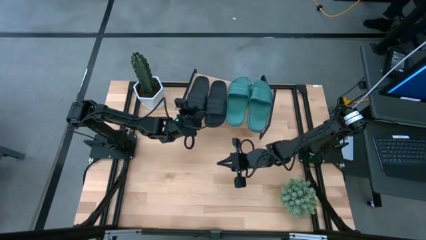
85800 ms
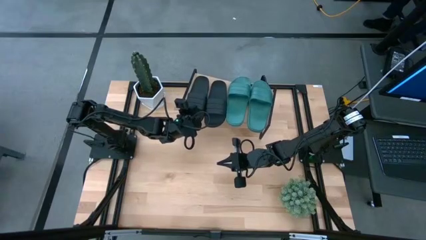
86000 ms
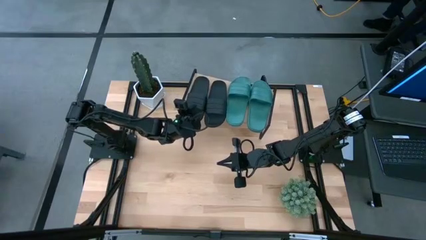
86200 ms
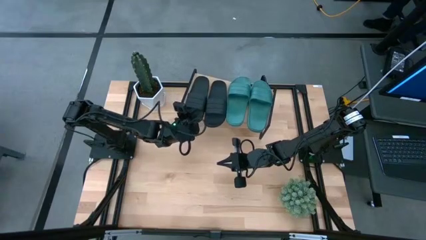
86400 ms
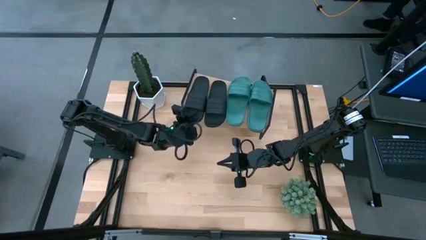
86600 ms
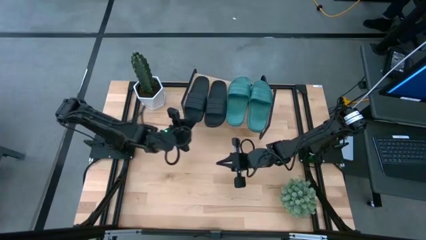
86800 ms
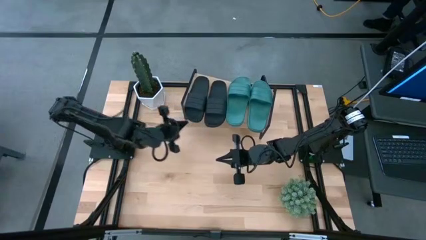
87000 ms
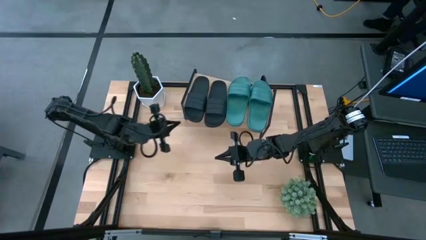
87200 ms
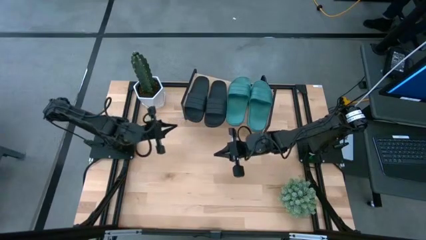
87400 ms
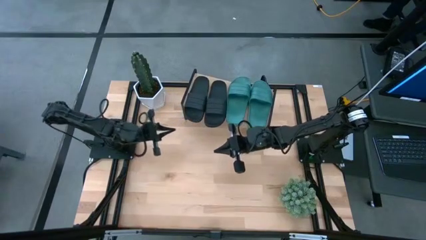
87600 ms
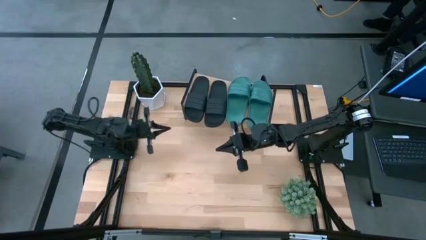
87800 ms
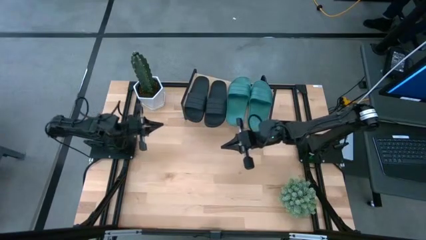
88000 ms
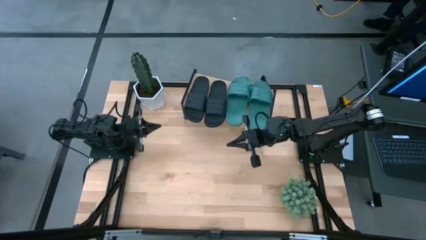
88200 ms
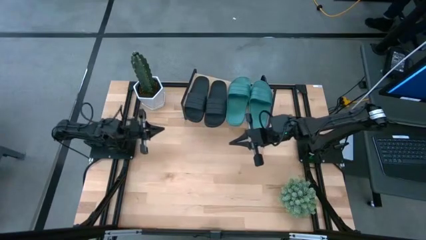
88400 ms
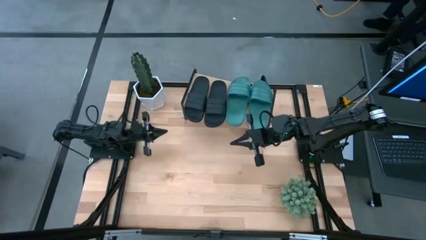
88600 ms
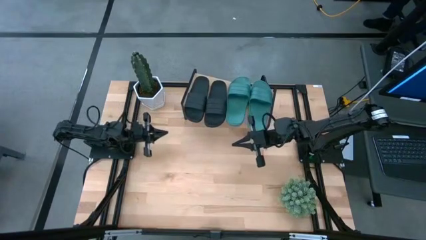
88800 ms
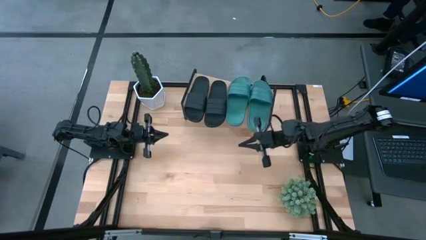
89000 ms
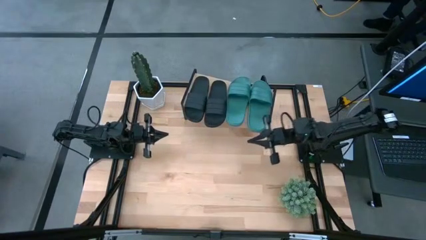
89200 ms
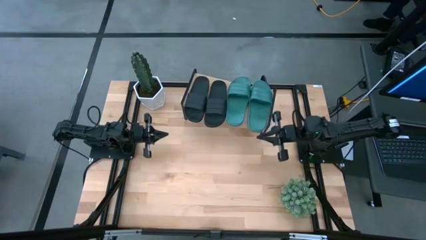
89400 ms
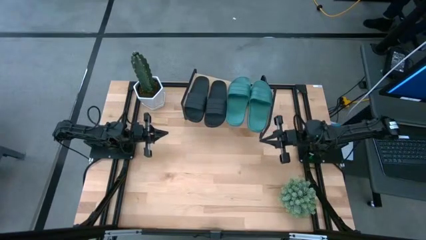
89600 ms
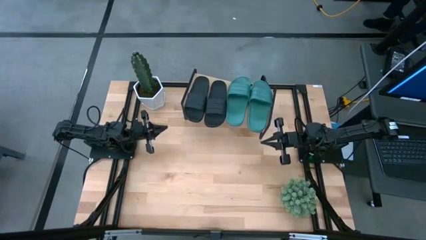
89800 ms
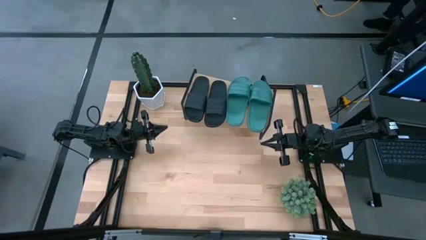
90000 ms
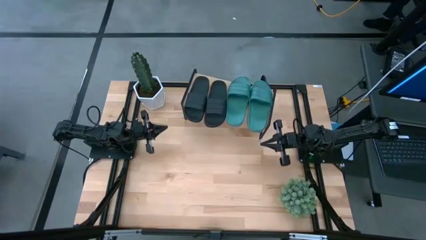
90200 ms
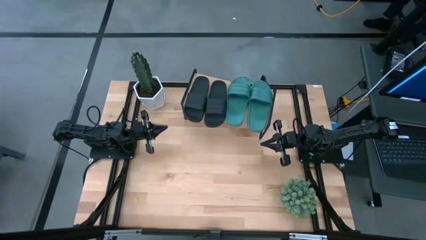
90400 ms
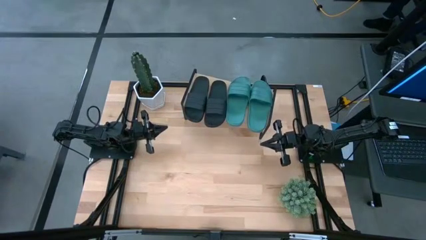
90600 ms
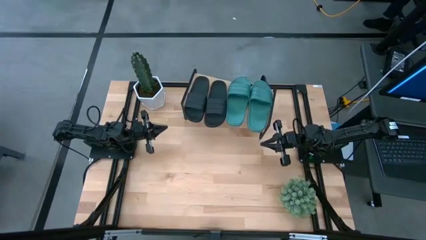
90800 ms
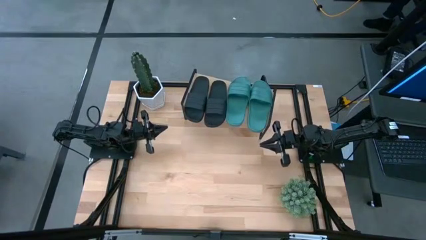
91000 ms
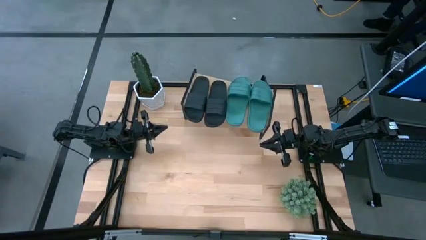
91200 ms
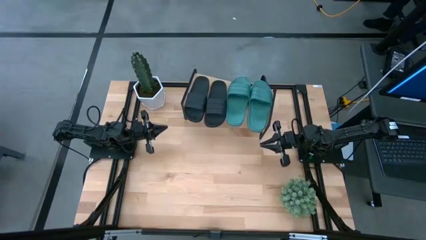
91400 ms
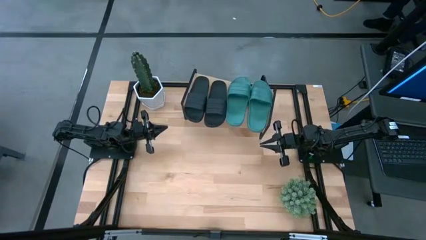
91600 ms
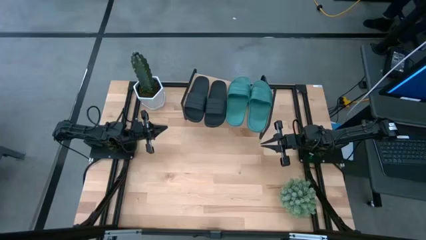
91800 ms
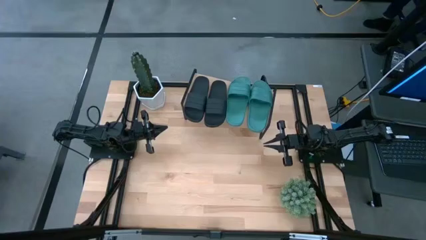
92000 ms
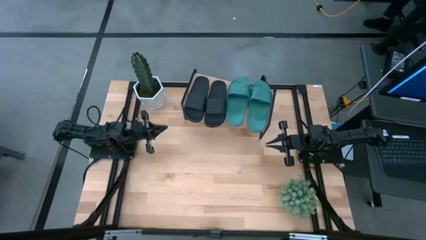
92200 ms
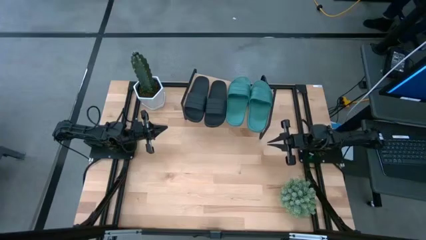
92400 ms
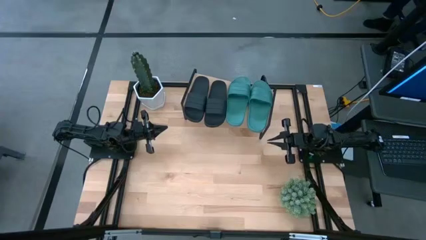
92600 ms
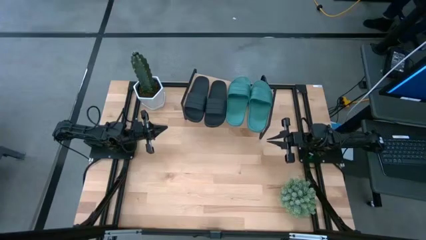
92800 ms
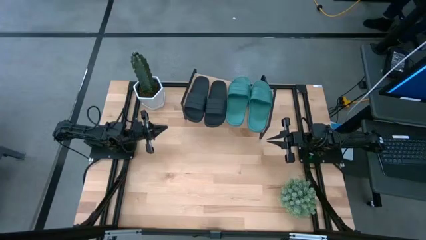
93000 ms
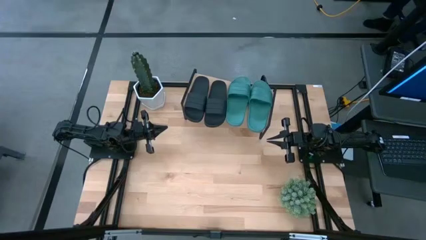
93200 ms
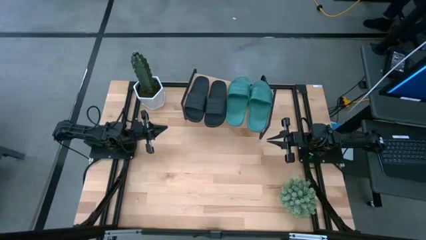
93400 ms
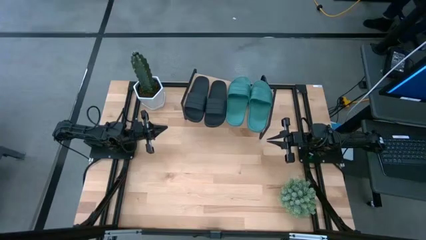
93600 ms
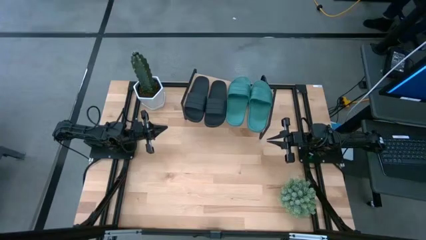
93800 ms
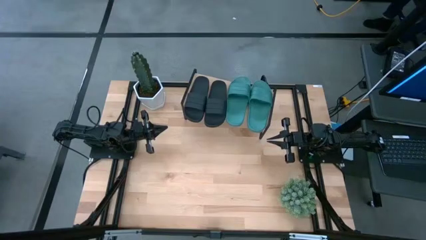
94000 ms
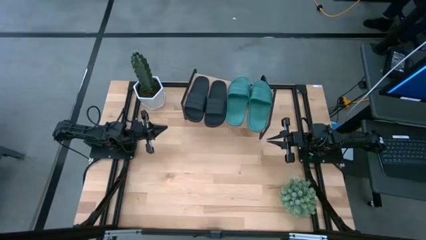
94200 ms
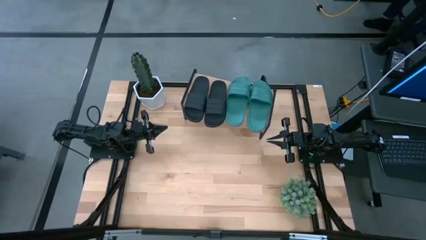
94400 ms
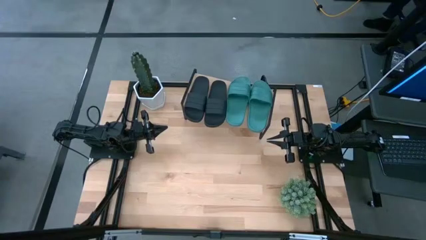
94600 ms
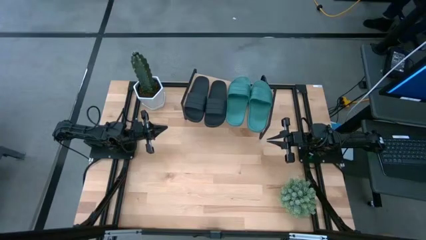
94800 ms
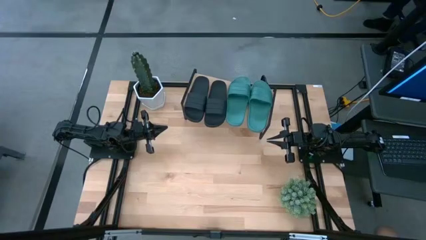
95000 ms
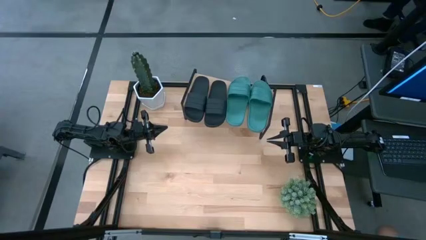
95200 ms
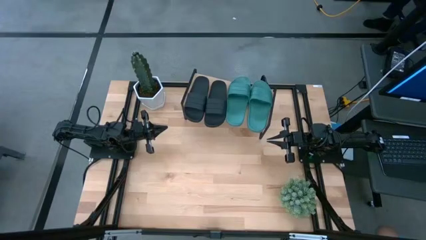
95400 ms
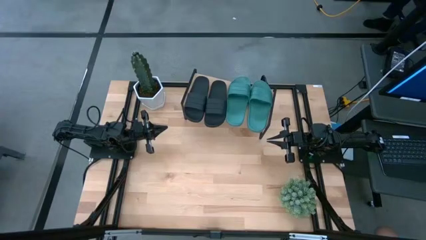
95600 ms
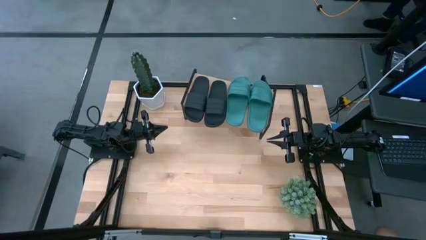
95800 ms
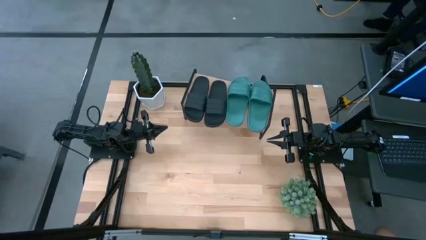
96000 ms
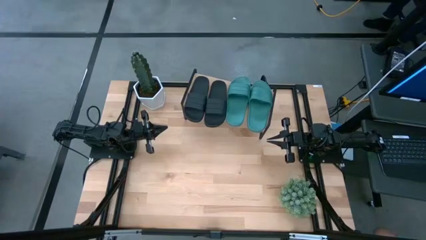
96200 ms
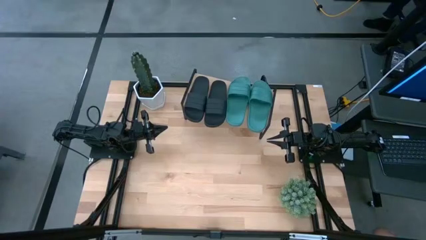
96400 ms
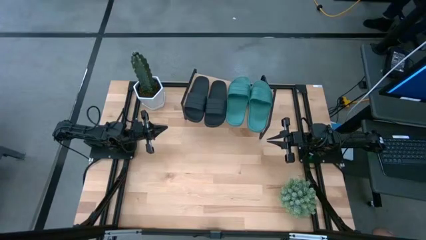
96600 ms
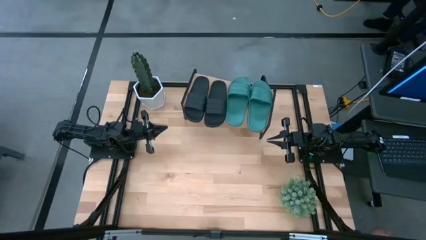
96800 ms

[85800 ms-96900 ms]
Task: Pick and place slides into the shelf
Return to home position

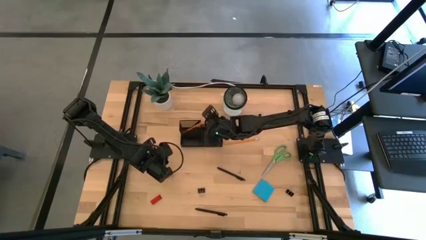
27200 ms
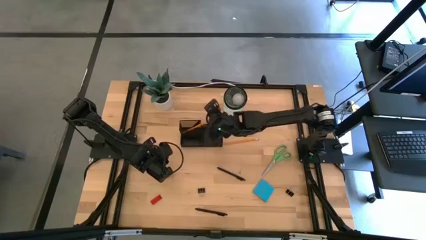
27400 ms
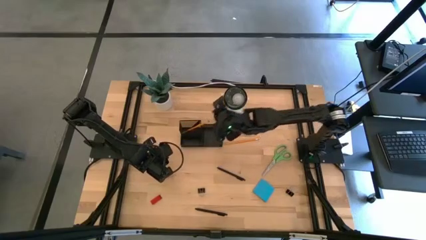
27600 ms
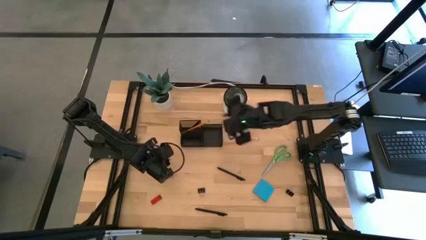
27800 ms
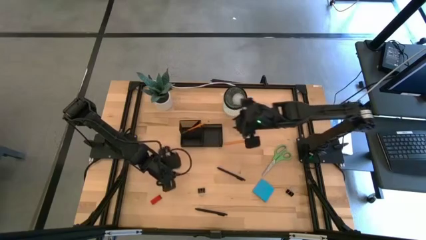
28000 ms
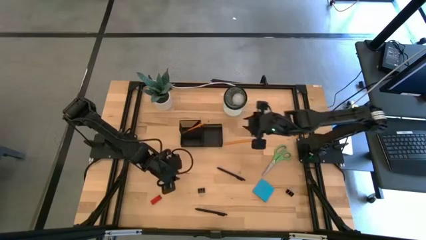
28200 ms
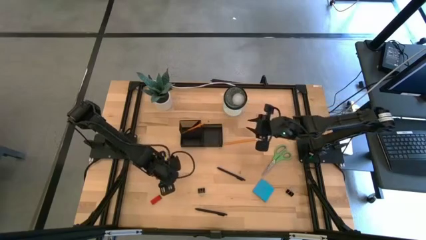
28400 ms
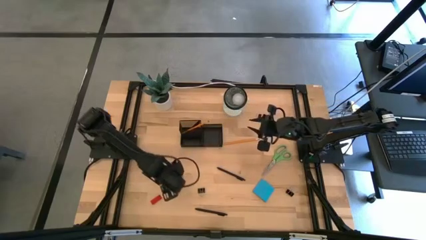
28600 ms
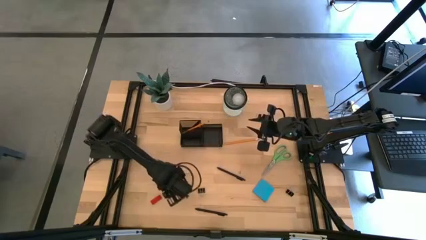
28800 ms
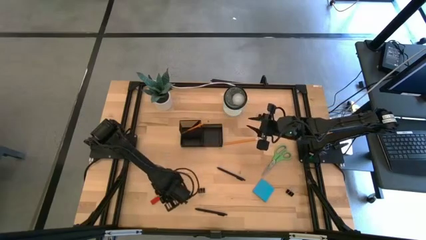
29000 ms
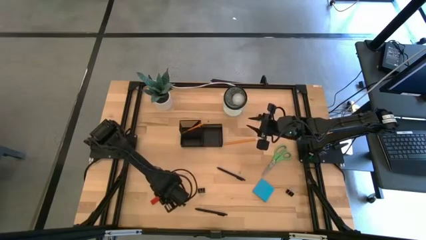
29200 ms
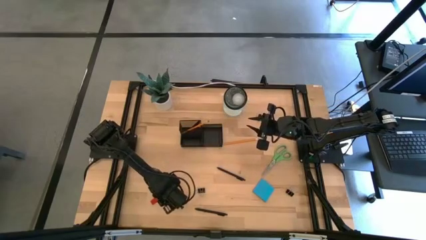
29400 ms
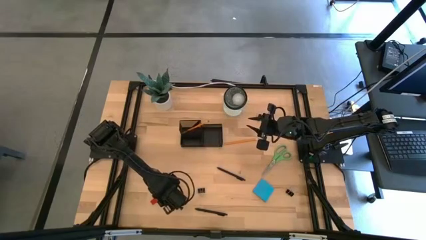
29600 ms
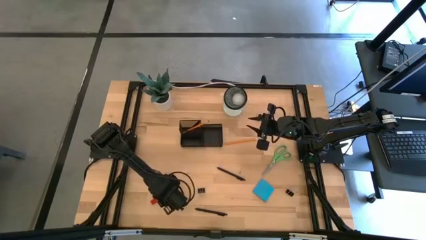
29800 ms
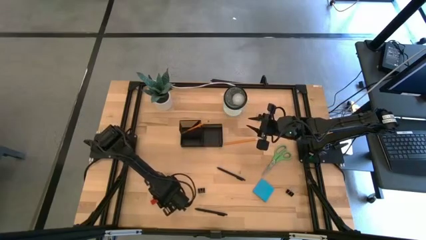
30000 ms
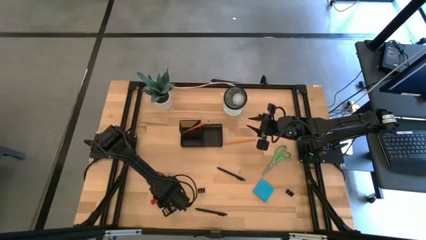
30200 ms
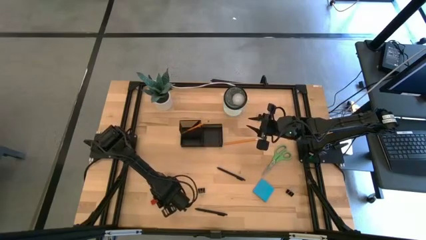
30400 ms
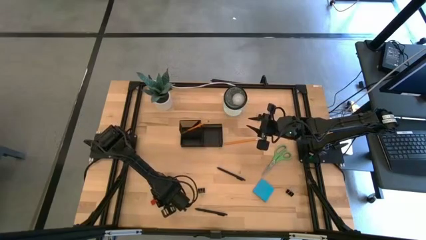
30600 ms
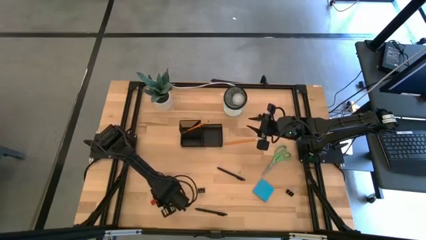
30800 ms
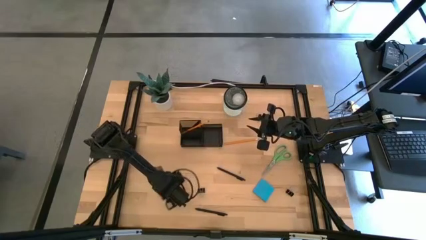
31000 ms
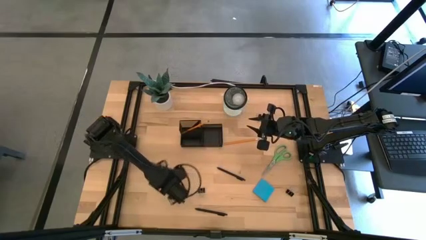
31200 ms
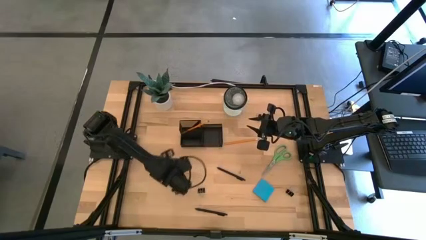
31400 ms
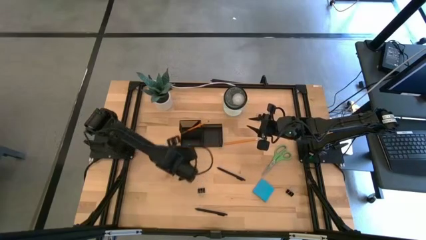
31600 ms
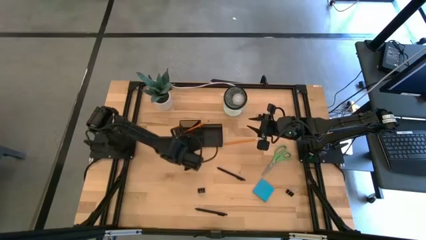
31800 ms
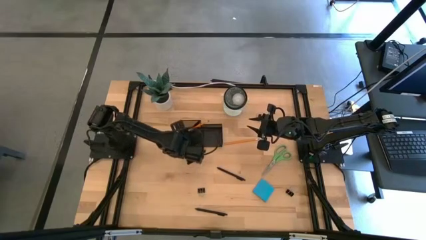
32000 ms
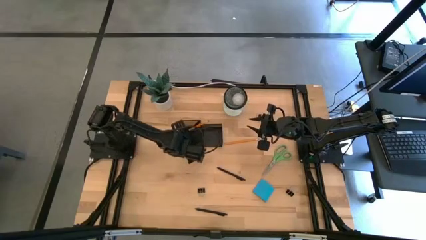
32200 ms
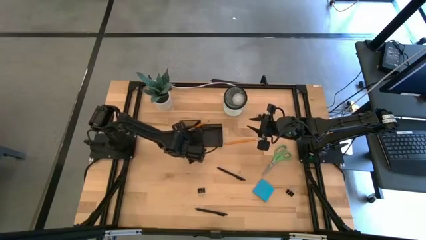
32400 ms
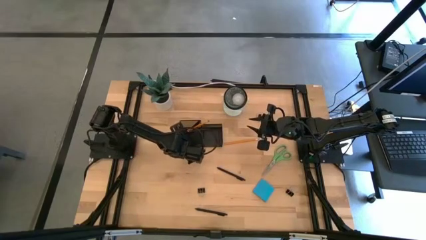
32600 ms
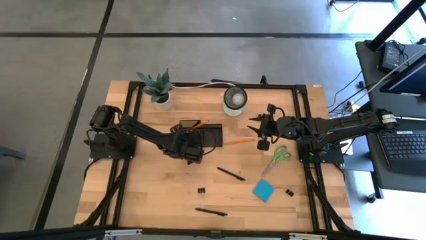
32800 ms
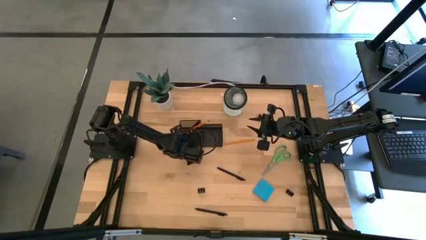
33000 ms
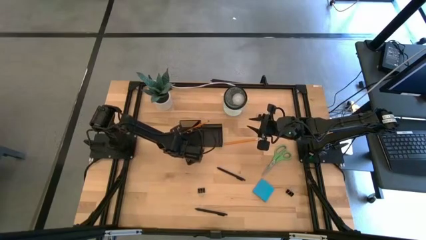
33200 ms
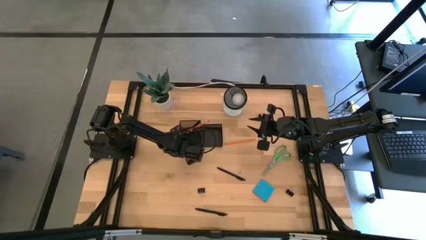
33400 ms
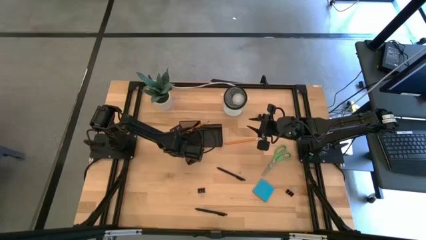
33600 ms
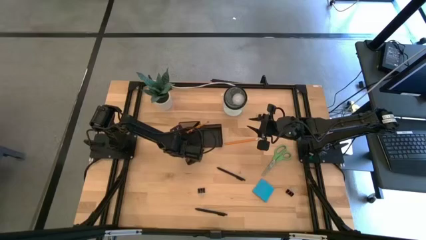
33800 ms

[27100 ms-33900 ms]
Task: Pick and place office supplies into organizer
Put the red eraser in the desk organizer
